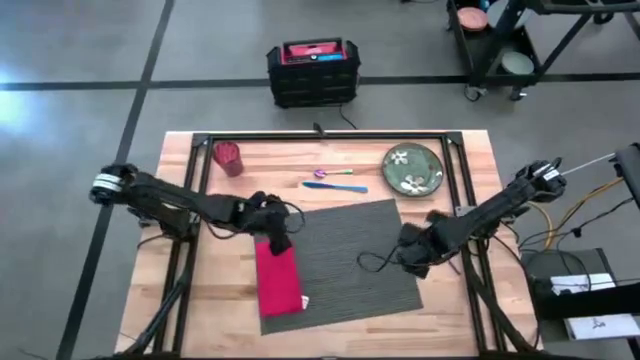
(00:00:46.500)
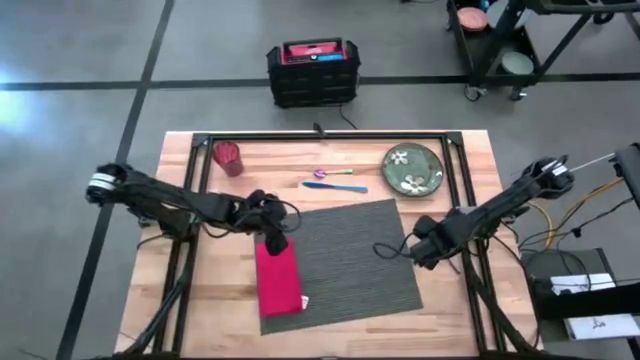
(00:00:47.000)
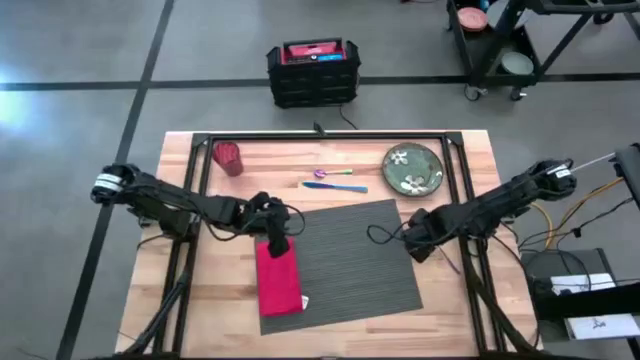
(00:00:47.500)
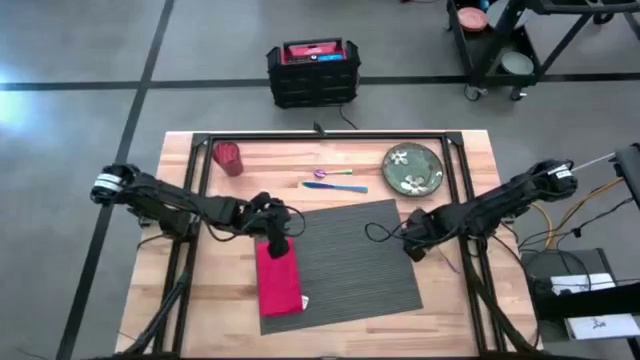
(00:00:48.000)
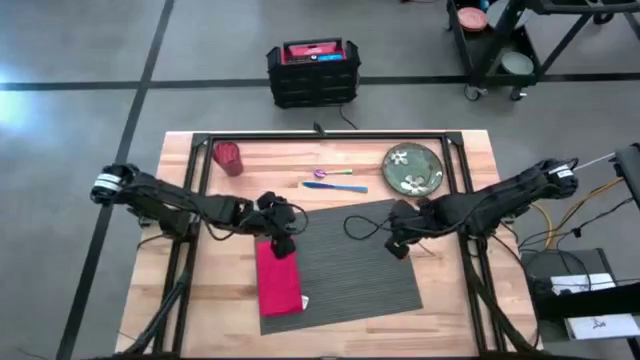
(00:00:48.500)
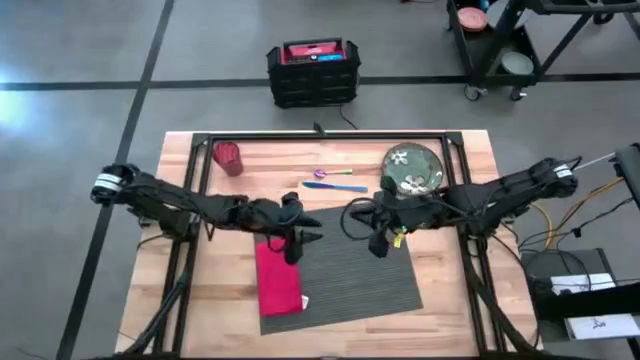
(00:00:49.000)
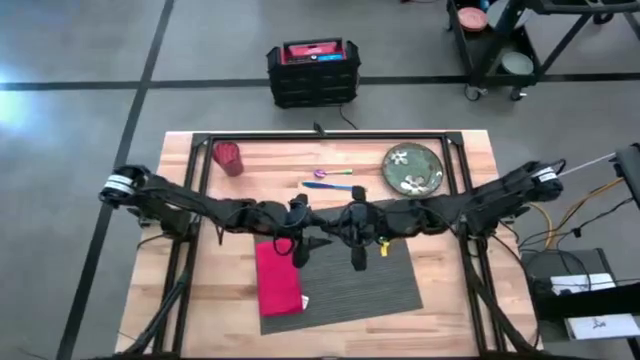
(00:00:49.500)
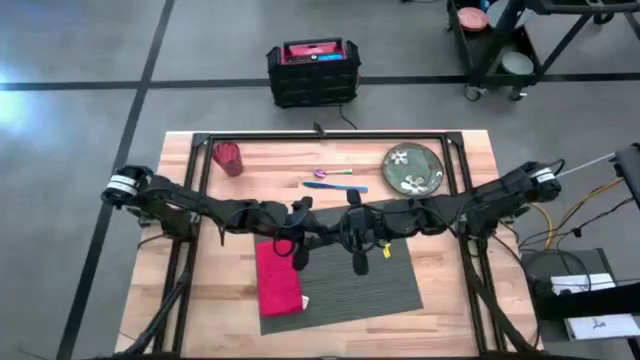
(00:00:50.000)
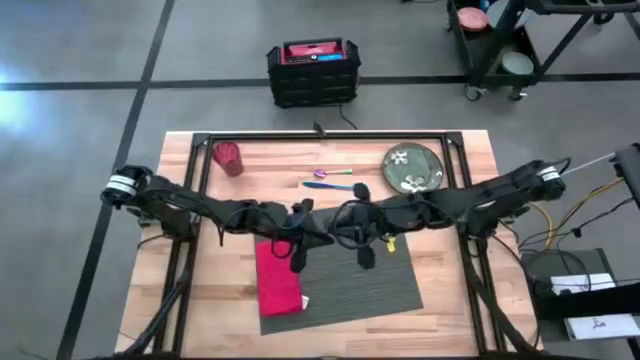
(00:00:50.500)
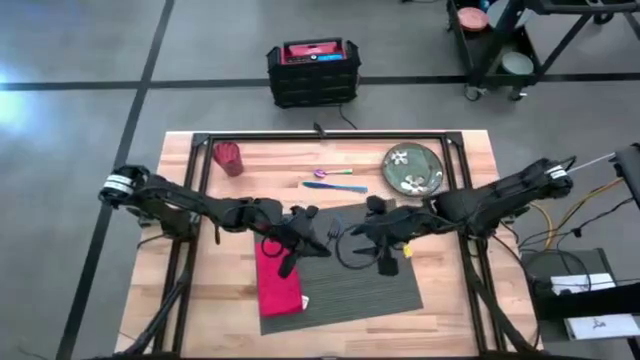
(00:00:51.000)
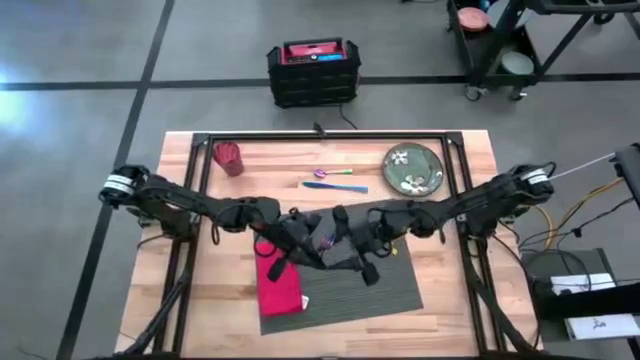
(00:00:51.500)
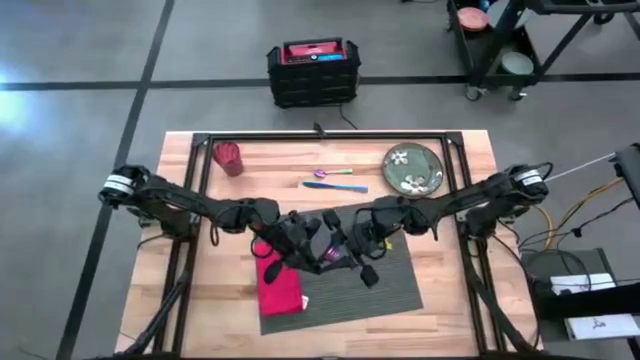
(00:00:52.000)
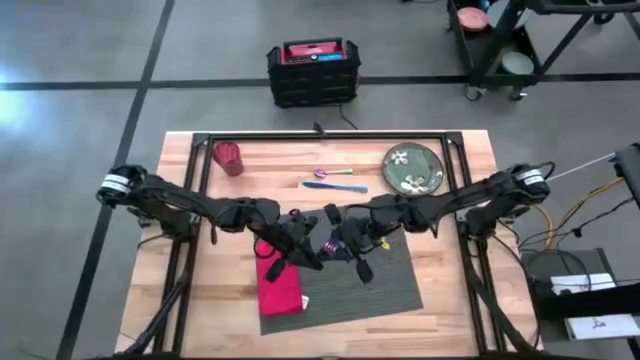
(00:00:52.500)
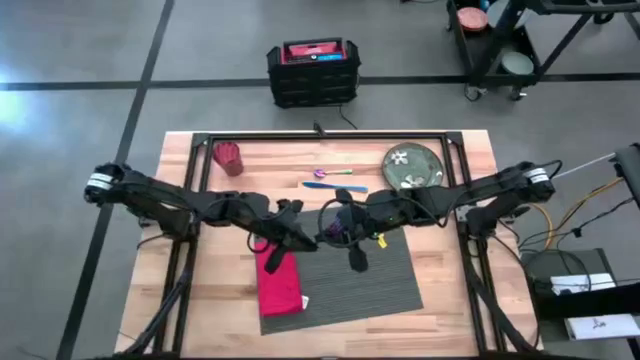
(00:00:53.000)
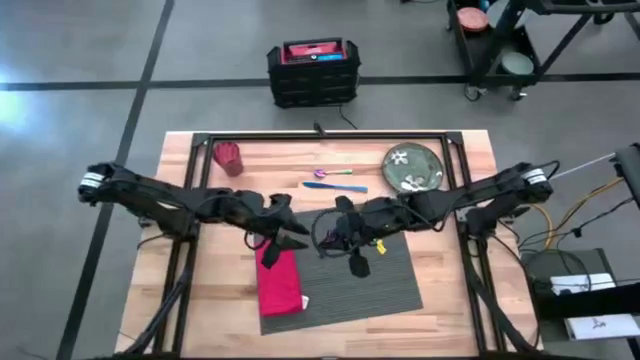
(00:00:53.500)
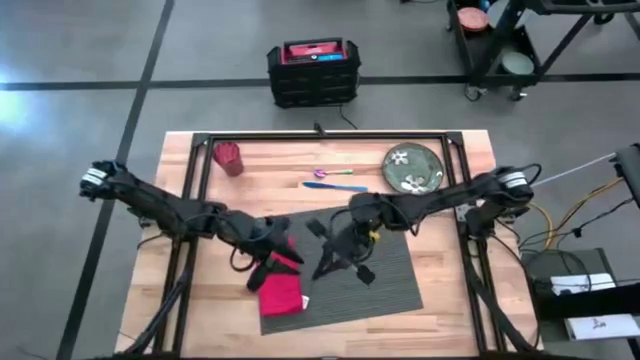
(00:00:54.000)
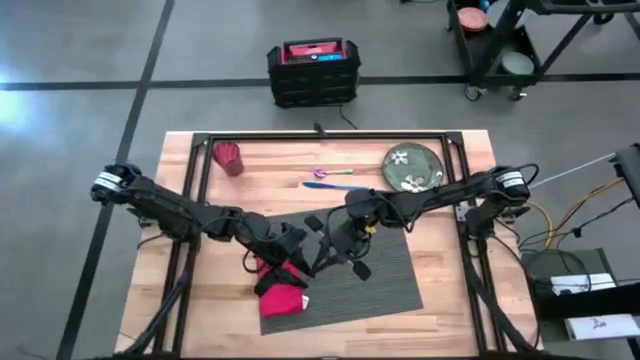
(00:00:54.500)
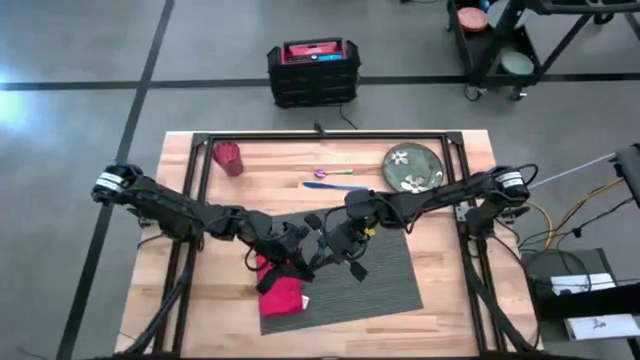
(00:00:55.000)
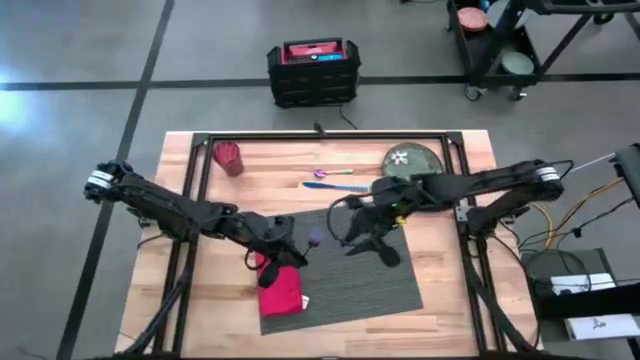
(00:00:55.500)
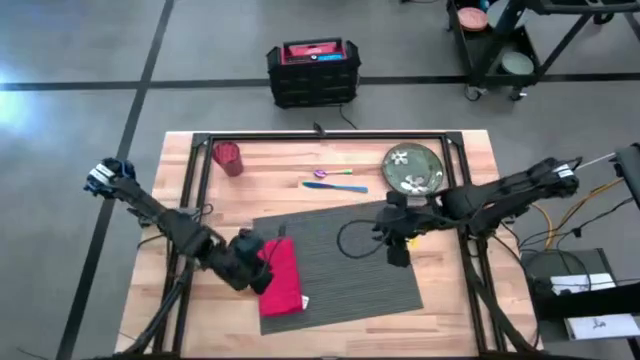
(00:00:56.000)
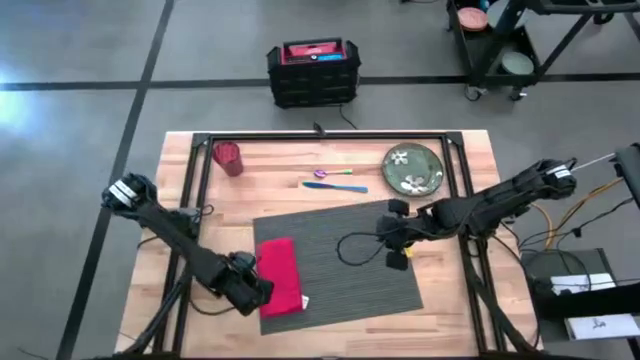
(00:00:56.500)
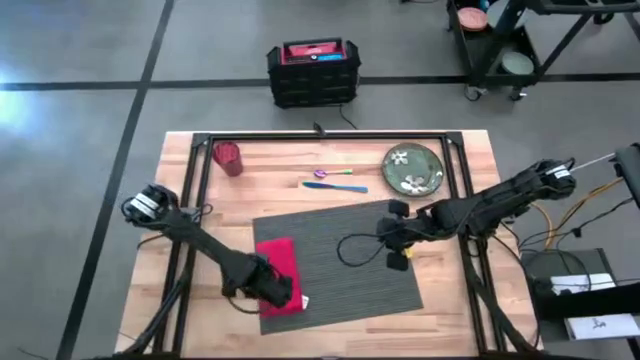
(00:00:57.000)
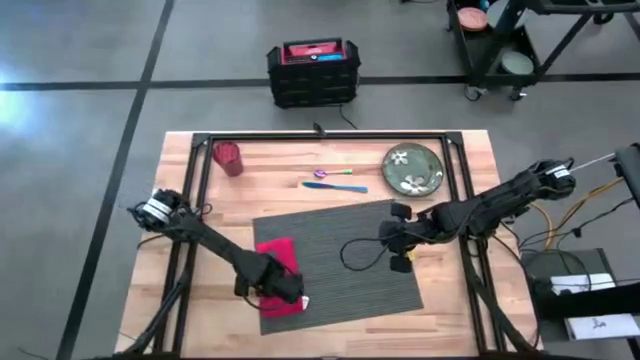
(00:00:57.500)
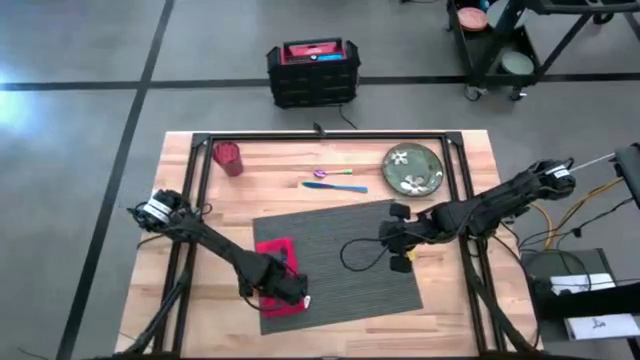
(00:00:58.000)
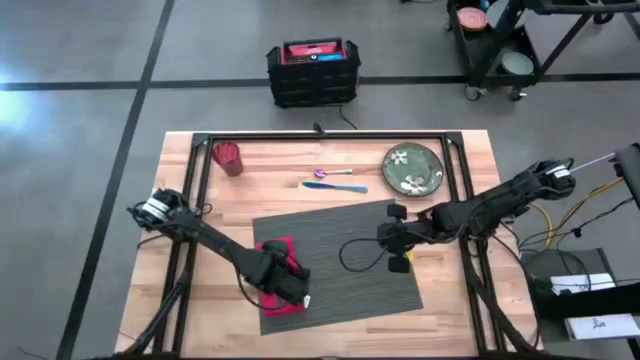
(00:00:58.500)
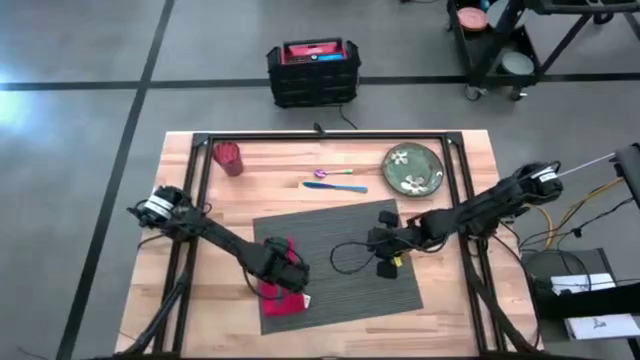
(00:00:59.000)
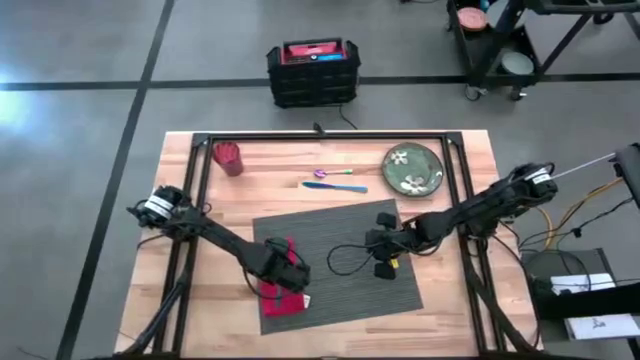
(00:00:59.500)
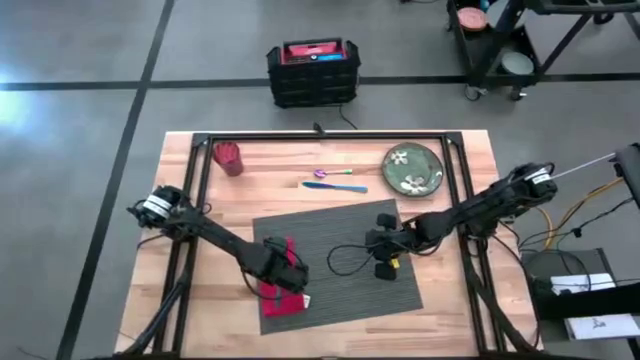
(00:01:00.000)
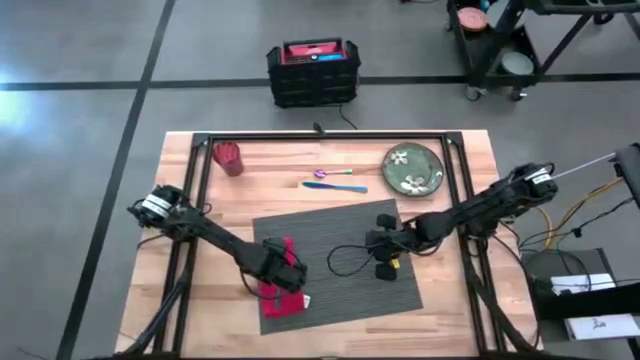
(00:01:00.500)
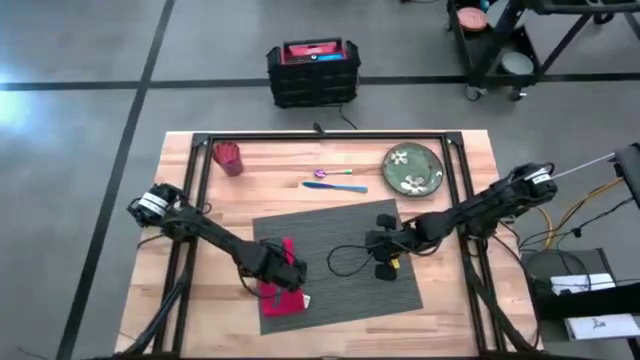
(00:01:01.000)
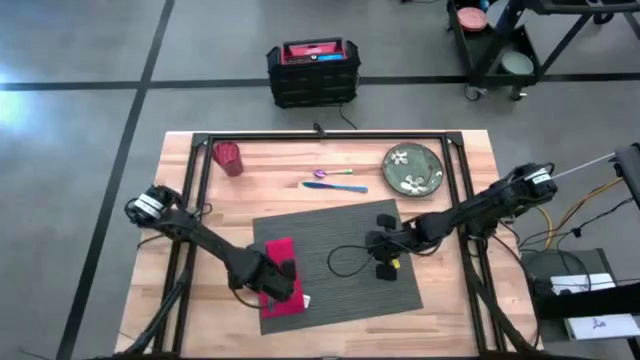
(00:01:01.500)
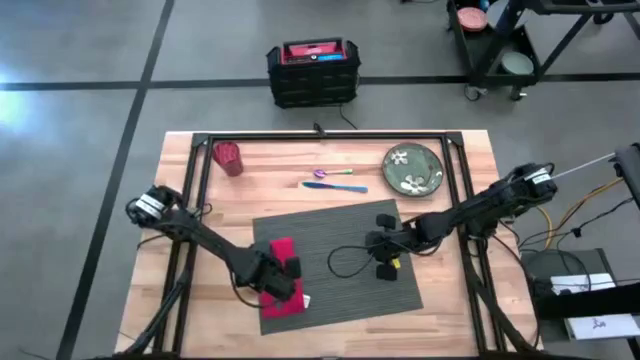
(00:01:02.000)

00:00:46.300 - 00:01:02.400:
Task: Set table place
Put the blue fork on top of the red table napkin

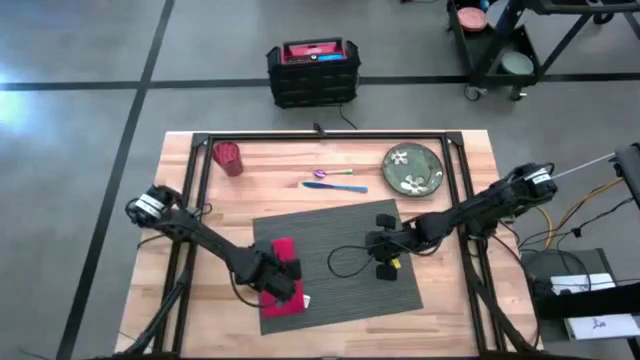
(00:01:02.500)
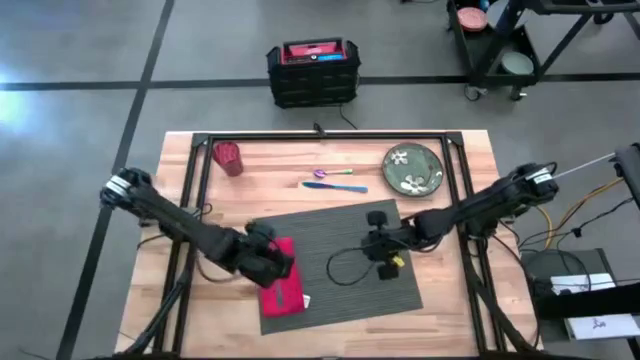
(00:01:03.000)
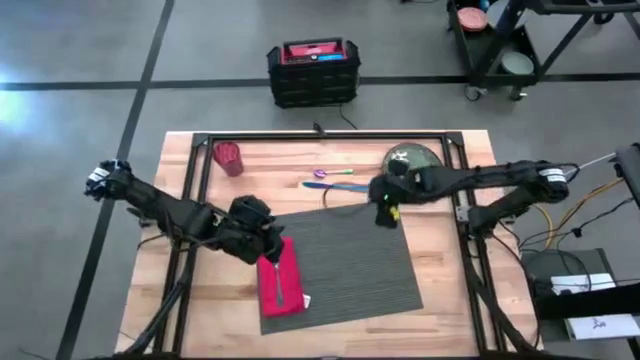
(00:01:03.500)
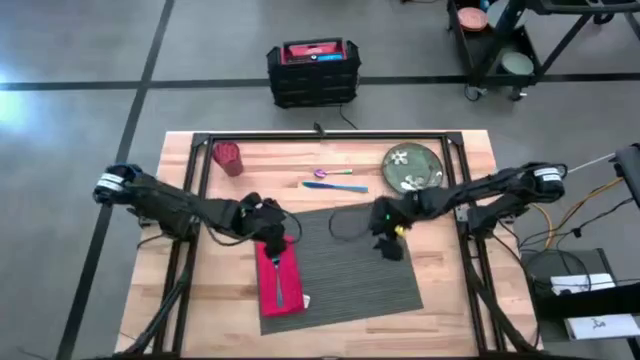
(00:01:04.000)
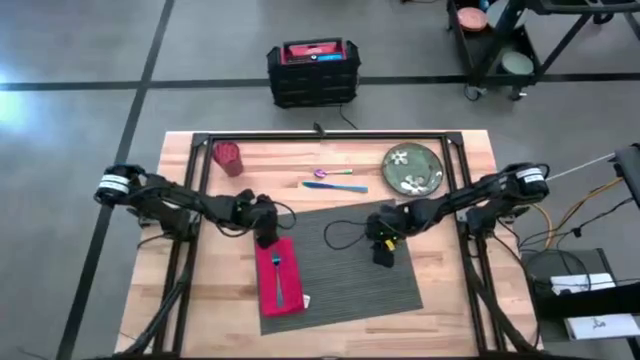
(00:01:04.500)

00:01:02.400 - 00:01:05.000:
Adjust the gray table mat
